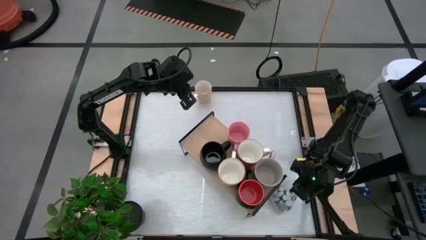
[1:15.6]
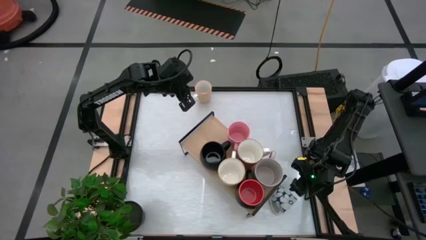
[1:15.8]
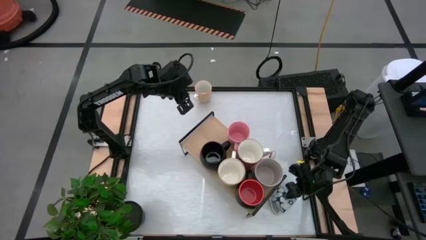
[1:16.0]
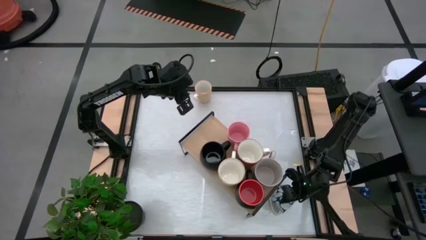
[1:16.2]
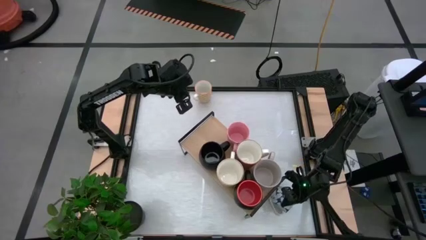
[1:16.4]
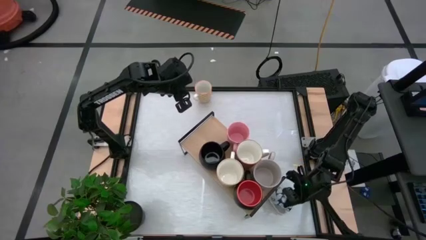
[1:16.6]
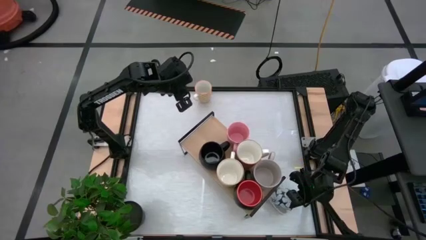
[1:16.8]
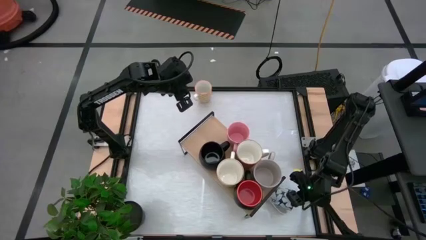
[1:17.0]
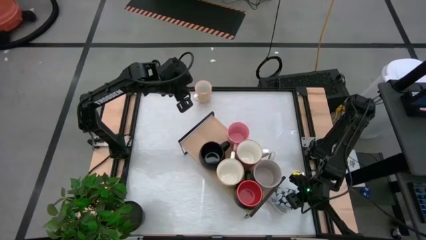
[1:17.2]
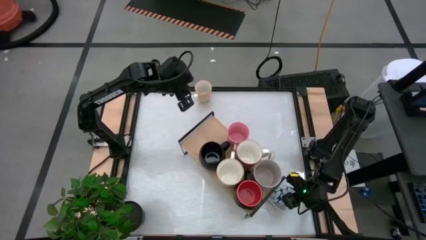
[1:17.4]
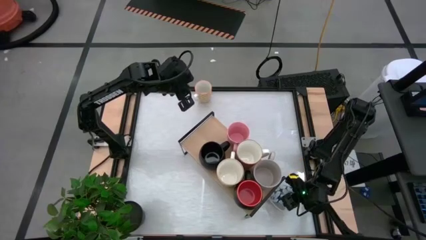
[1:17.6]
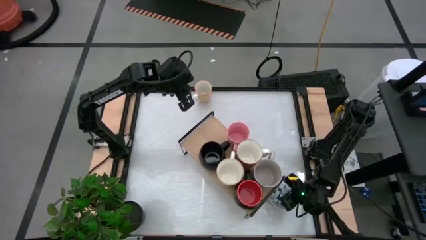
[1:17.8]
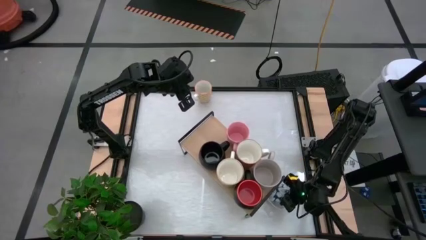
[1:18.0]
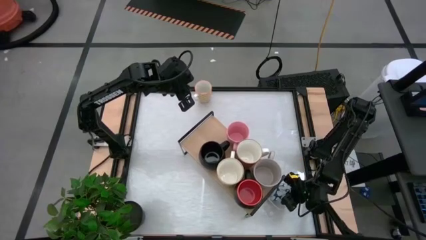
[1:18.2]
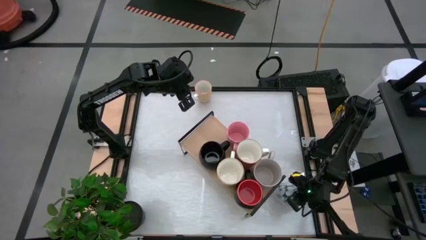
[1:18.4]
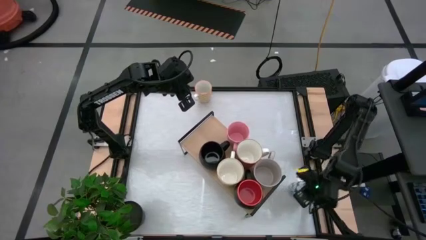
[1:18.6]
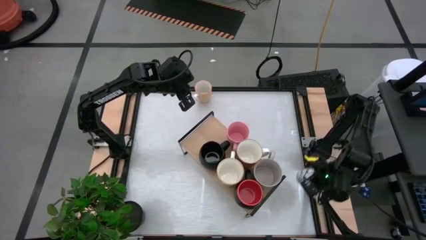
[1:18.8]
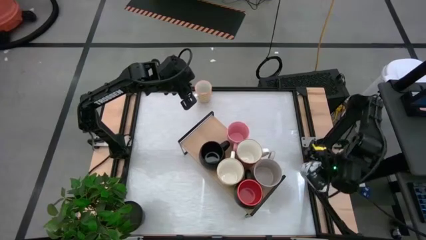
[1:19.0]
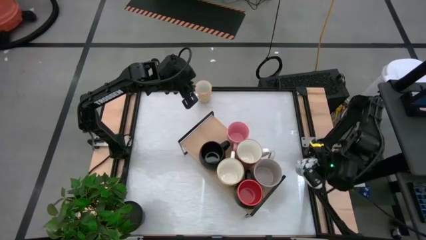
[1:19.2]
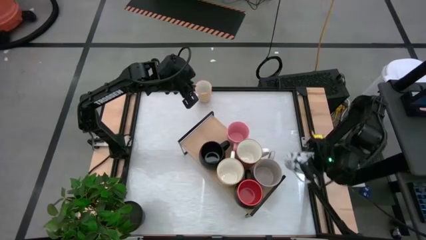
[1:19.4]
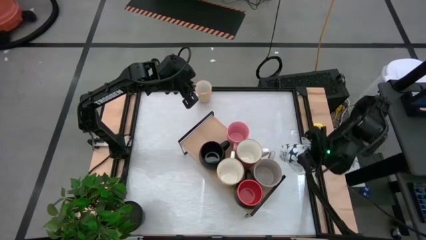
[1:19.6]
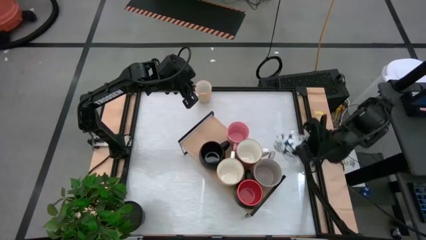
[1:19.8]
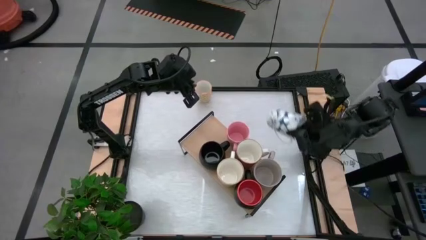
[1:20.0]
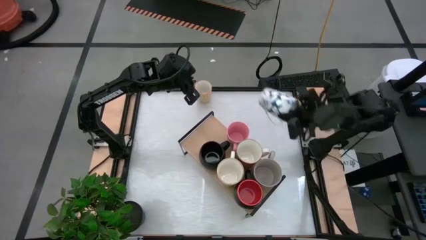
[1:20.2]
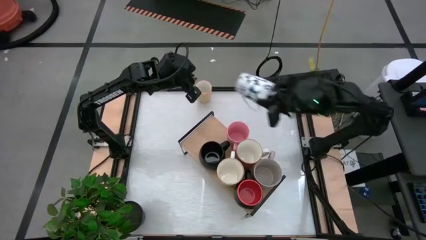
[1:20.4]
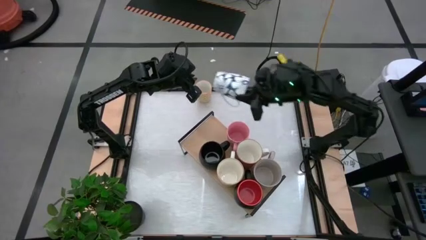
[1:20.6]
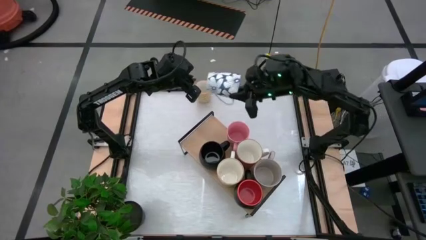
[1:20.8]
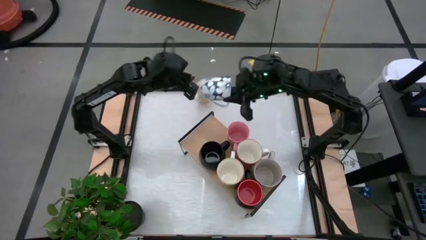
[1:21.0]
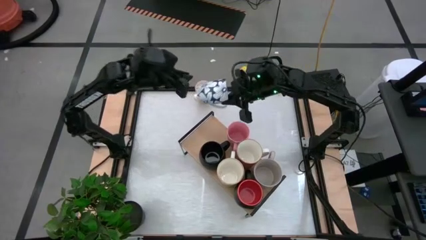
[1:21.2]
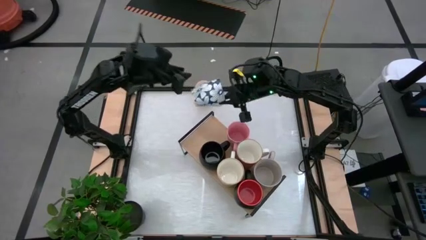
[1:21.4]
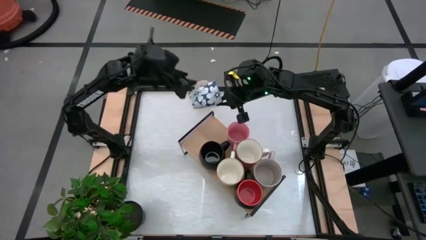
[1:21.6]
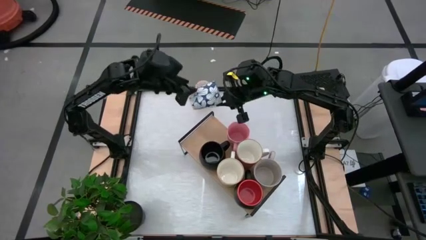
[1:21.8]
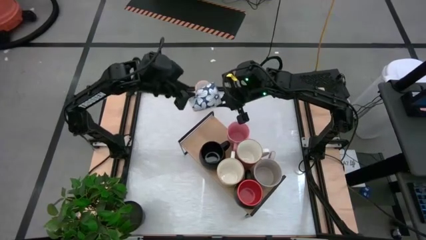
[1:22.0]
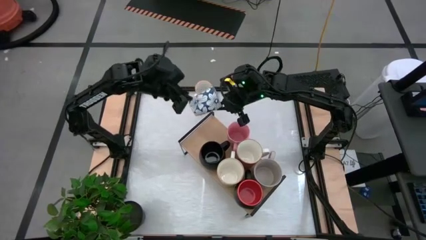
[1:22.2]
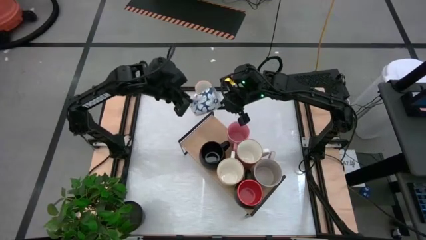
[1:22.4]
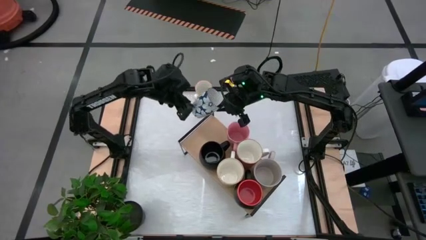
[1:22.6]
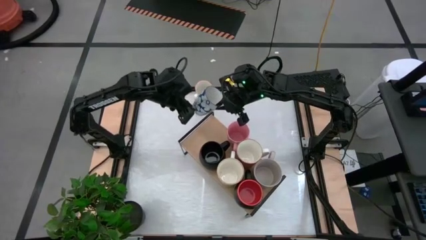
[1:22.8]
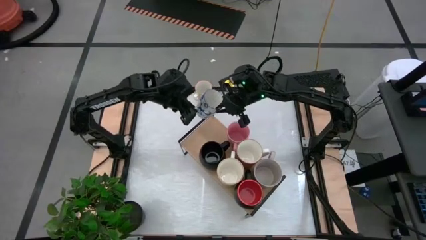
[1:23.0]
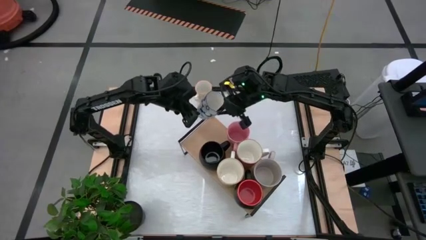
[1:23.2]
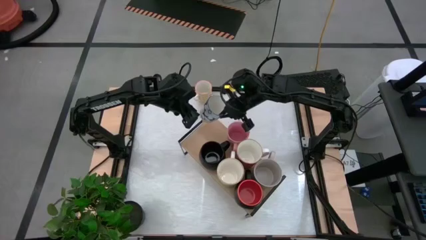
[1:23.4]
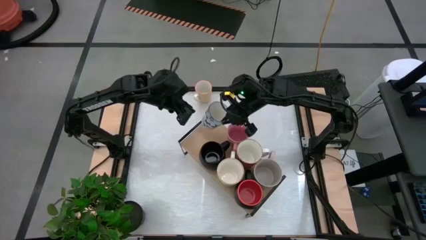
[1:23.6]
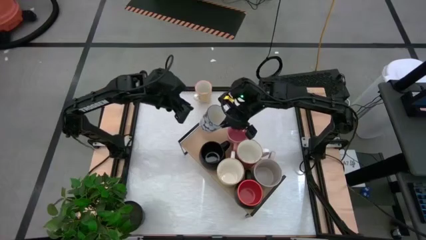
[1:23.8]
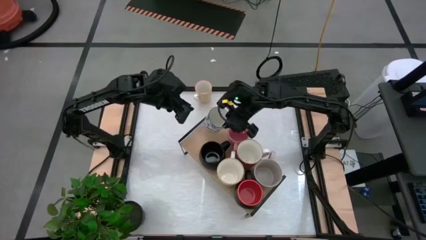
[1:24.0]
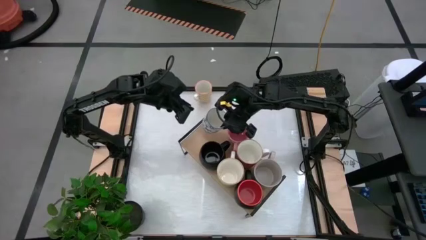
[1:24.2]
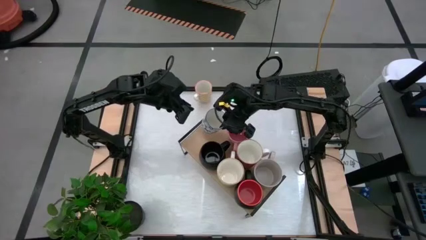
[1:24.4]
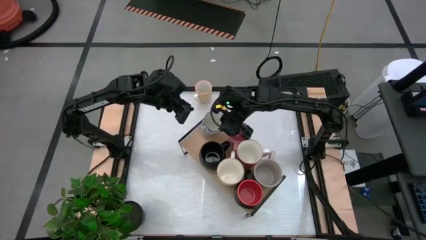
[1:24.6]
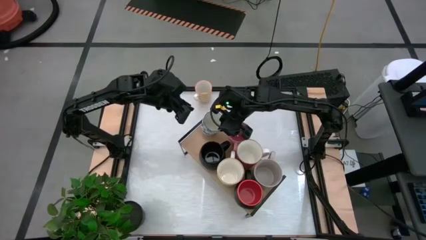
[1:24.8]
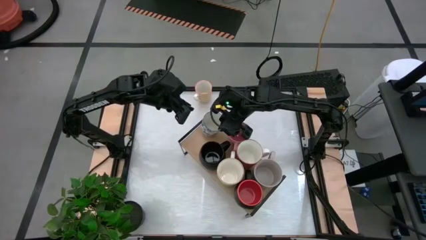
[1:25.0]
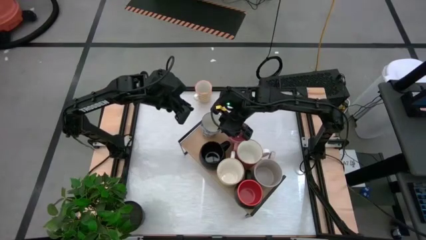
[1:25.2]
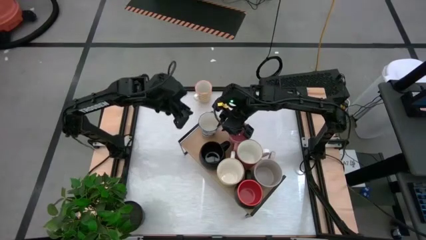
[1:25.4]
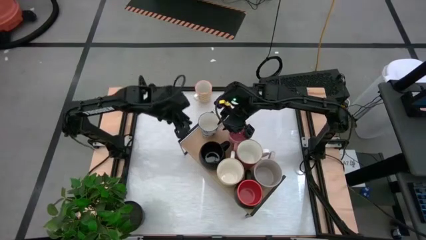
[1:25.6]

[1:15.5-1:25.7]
Task: Place coffee mugs
Put the blue-white mug on the shelf

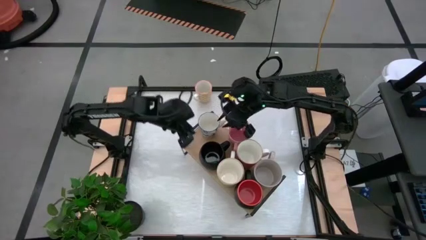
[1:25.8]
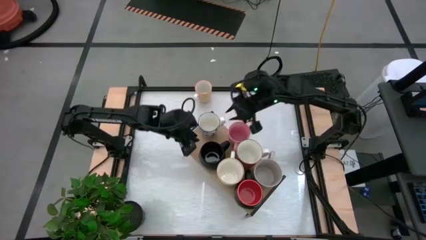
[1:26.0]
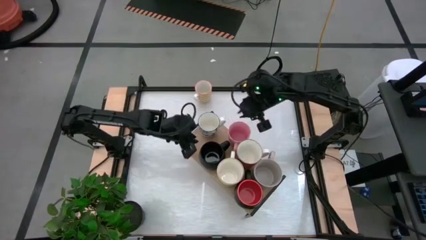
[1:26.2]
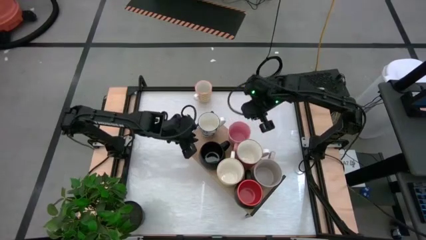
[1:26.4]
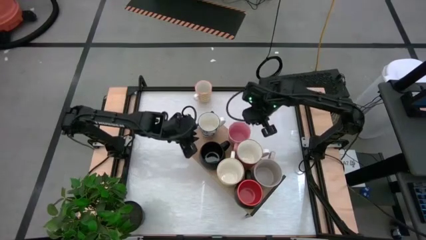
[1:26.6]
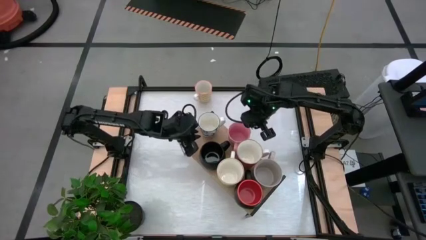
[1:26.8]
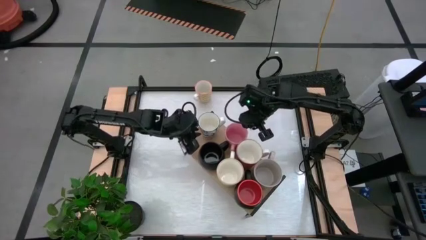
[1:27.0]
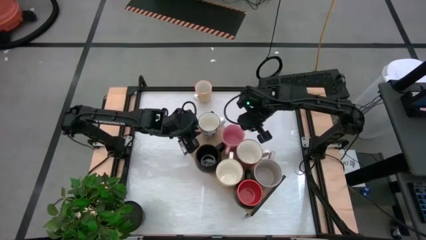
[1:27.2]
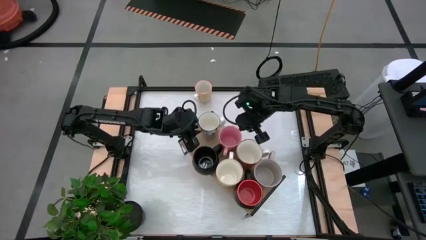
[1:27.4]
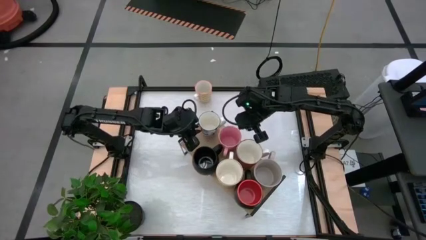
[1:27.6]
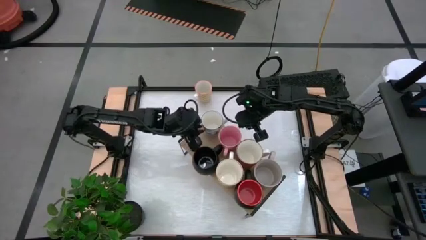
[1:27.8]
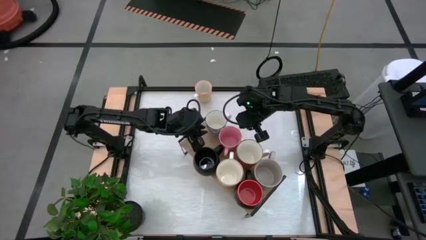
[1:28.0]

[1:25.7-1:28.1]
Adjust the pink and white mugs on the shelf

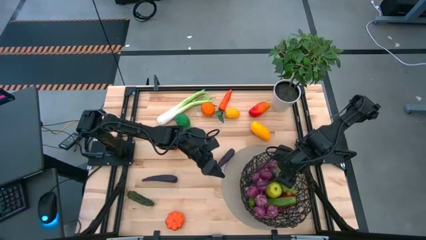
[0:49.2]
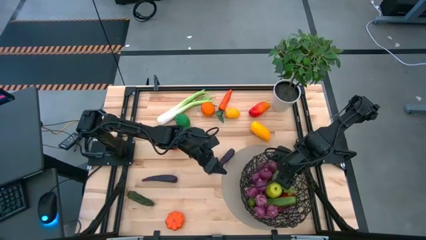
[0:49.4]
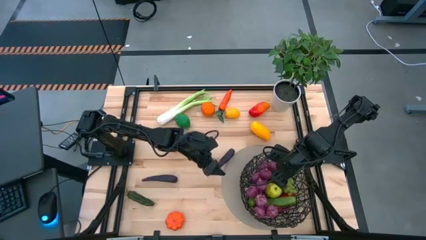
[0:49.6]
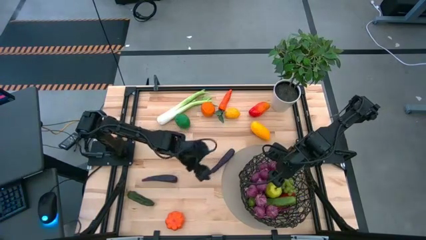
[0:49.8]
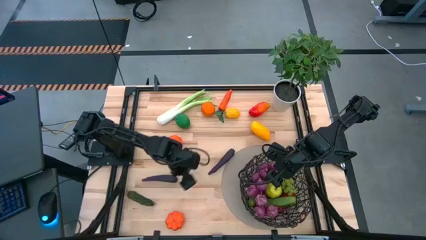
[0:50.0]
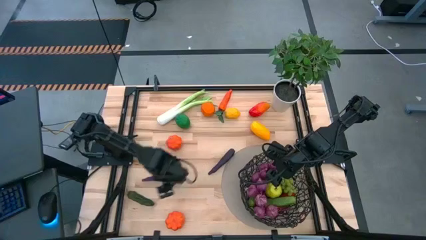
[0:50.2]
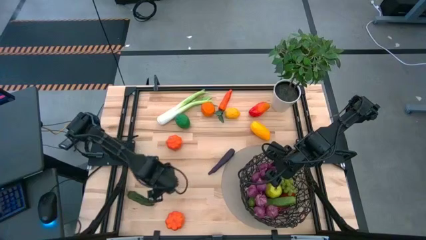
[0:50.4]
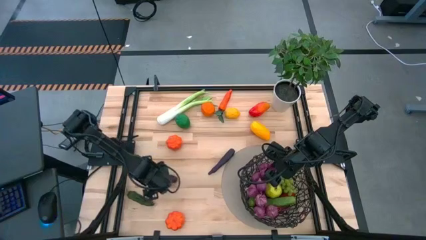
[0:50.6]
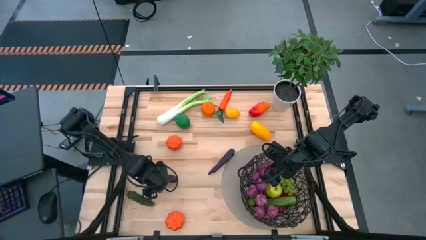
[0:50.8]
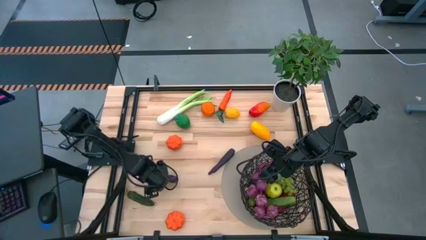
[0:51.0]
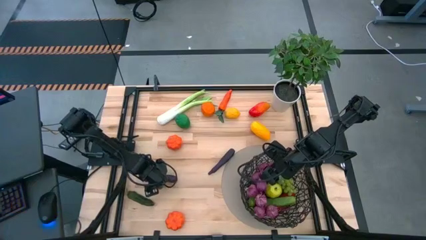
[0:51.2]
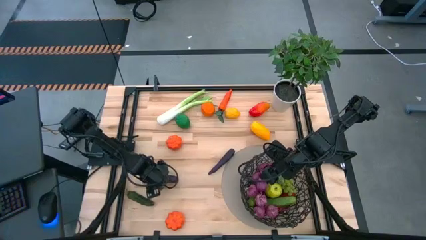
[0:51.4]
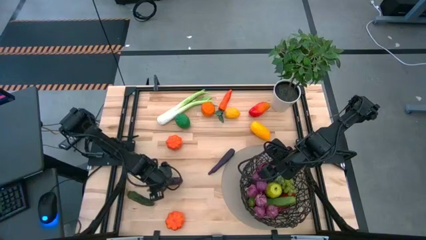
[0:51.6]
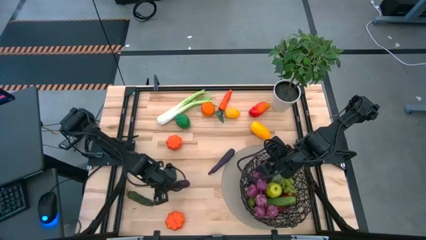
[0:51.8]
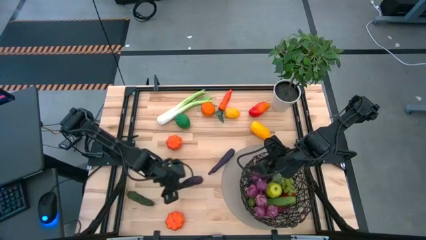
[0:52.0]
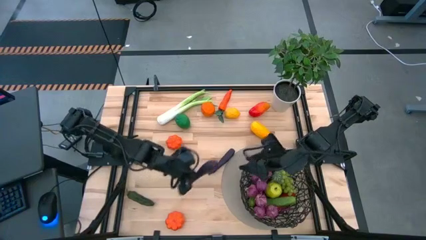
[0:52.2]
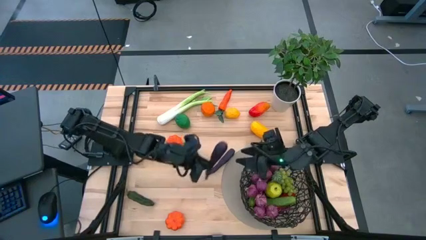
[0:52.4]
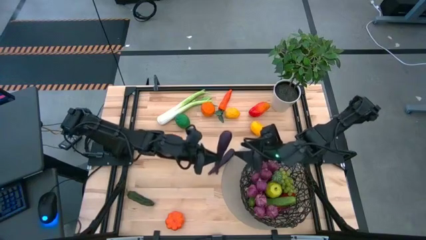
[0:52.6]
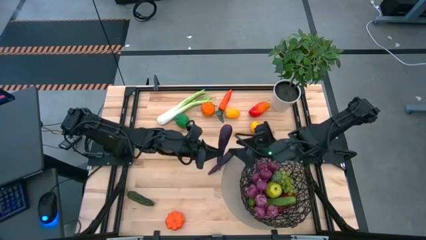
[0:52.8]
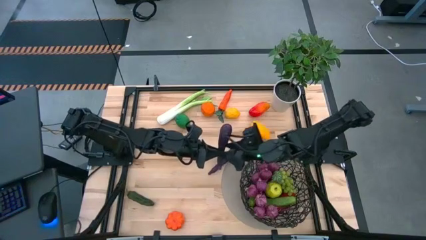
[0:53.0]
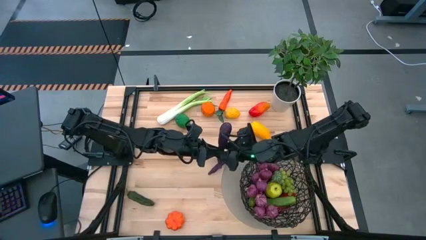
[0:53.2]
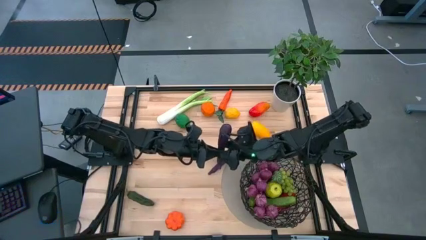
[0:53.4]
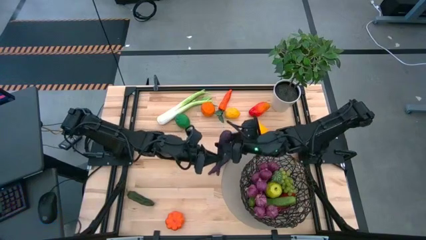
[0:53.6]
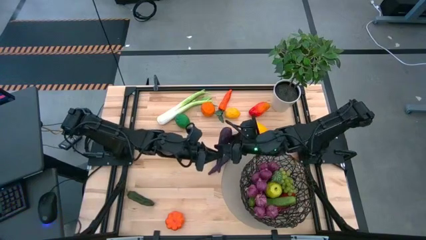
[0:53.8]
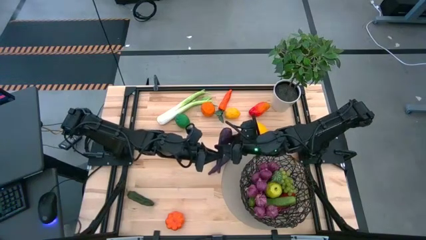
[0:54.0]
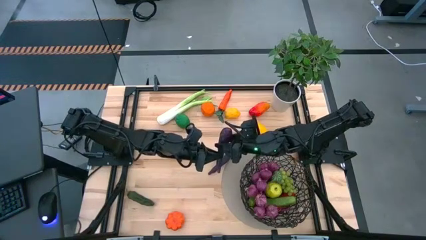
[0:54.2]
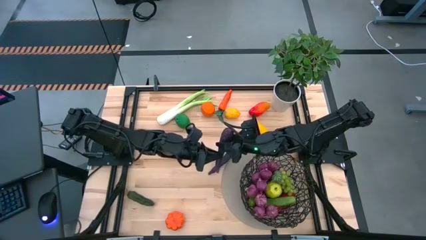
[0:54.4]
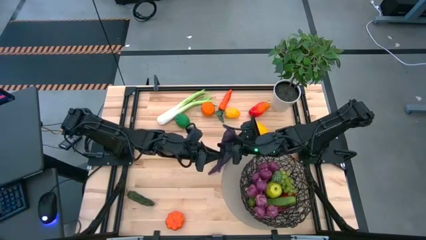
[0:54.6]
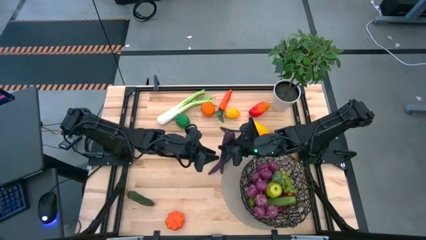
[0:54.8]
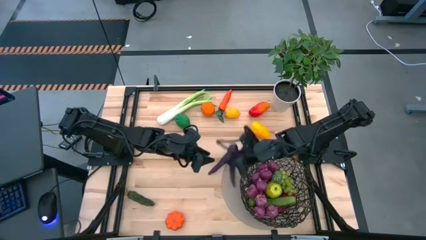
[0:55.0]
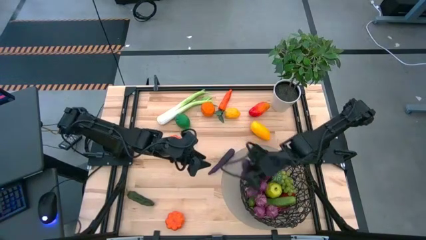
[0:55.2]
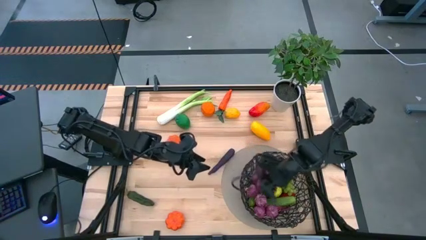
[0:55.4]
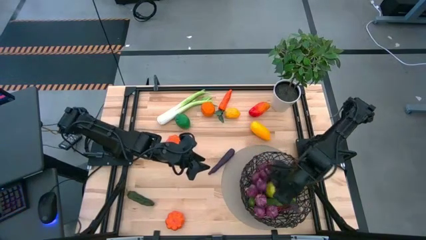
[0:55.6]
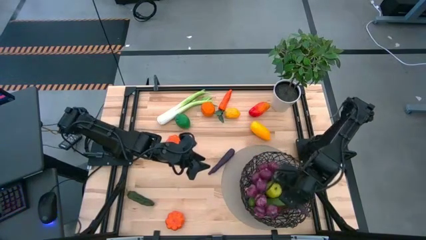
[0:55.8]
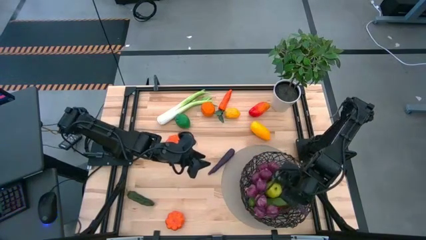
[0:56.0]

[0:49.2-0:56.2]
Task: Build produce basket
Put the bottom purple eggplant into the black basket
